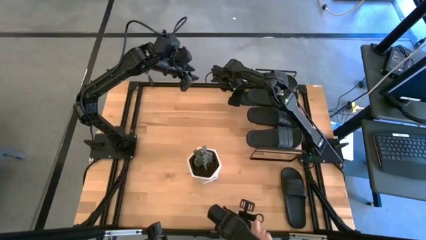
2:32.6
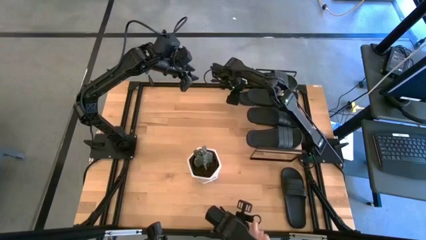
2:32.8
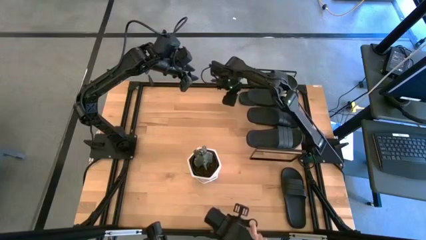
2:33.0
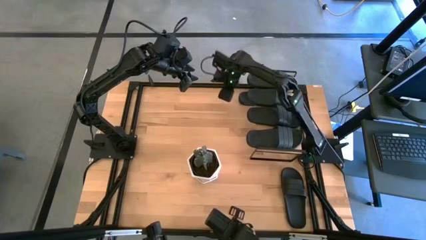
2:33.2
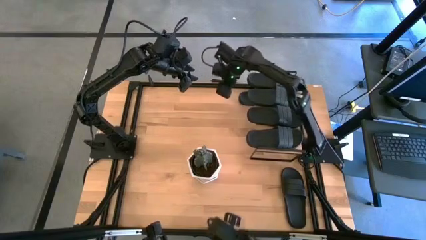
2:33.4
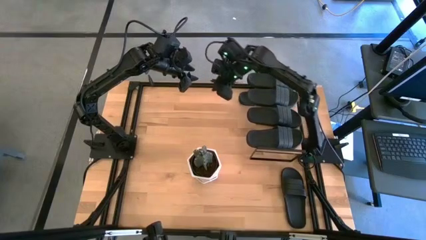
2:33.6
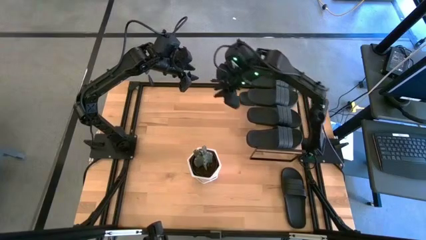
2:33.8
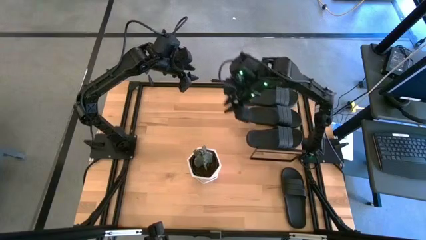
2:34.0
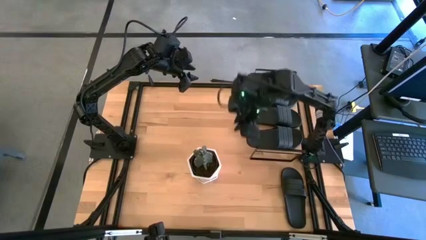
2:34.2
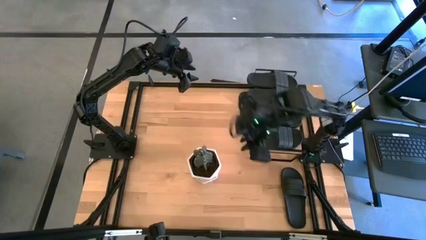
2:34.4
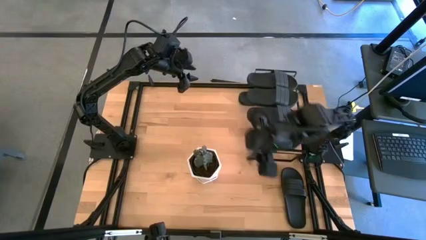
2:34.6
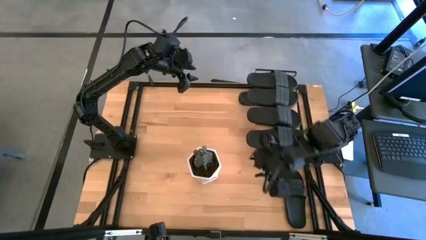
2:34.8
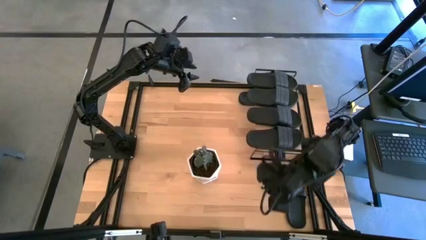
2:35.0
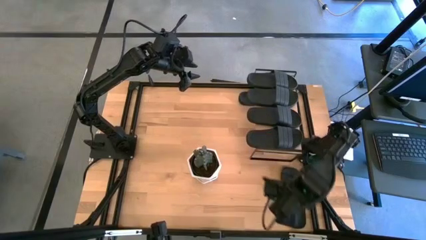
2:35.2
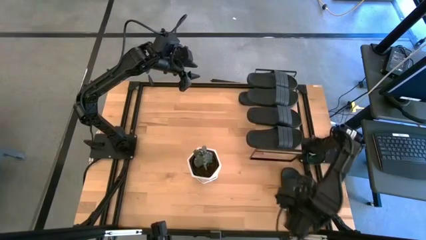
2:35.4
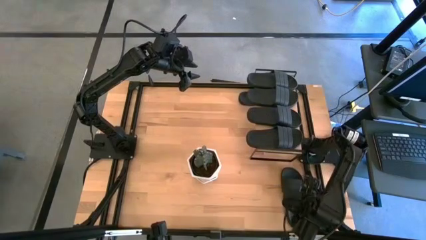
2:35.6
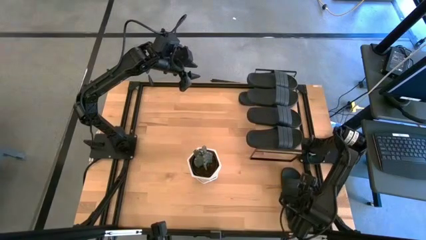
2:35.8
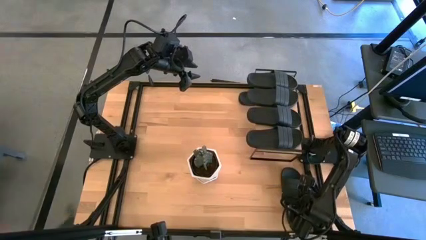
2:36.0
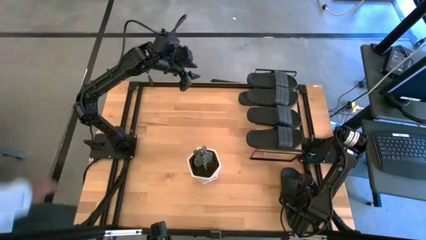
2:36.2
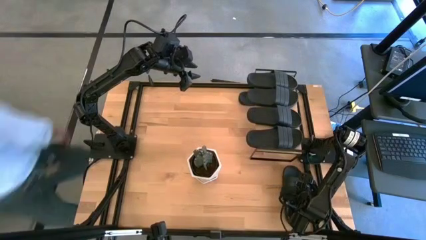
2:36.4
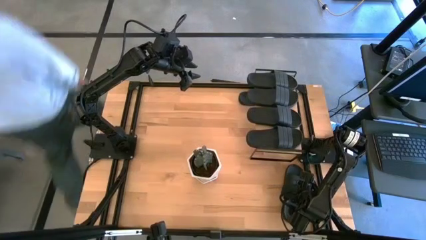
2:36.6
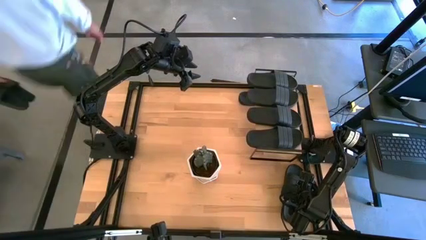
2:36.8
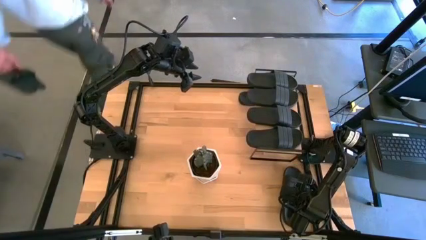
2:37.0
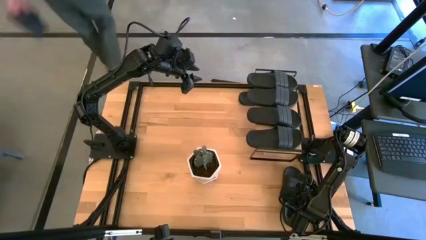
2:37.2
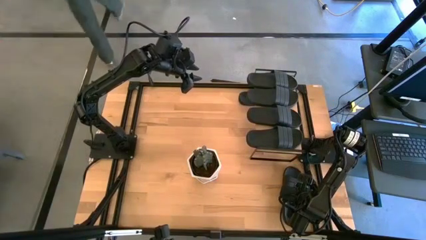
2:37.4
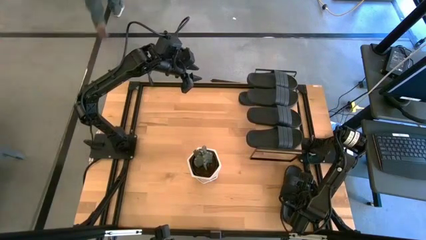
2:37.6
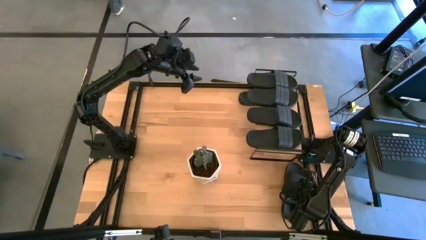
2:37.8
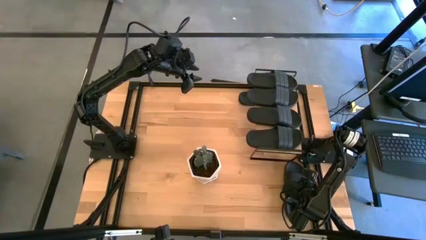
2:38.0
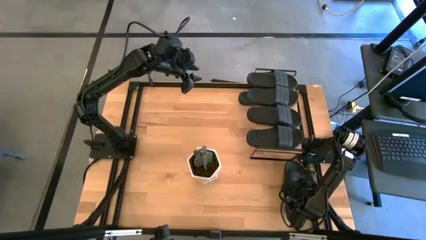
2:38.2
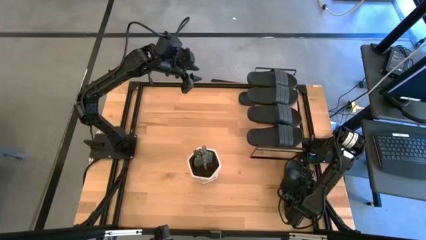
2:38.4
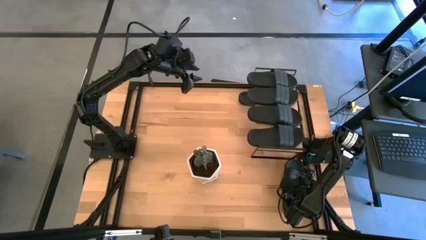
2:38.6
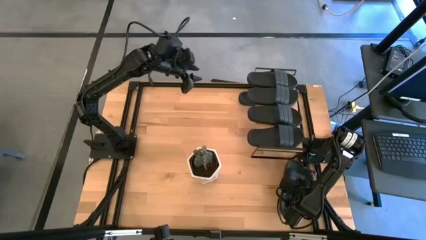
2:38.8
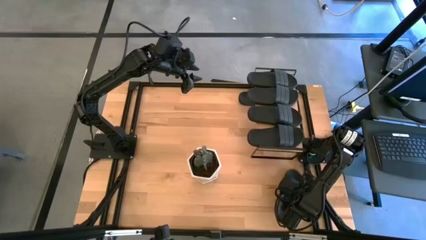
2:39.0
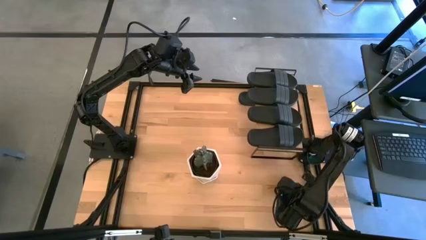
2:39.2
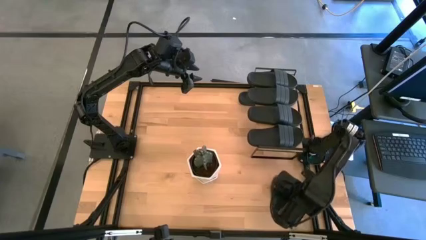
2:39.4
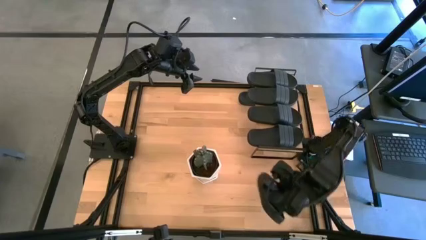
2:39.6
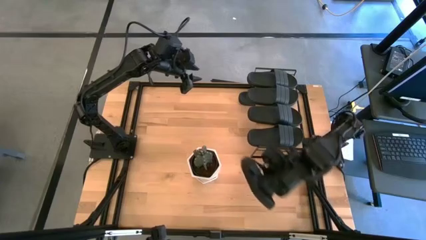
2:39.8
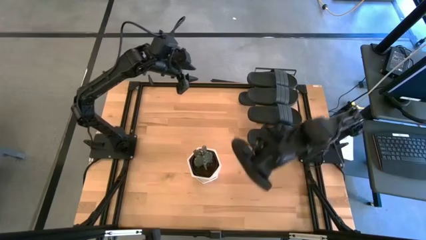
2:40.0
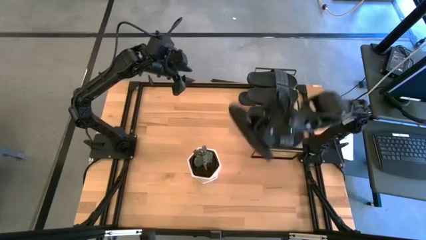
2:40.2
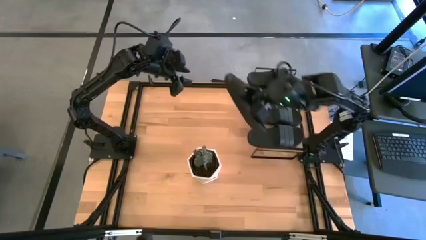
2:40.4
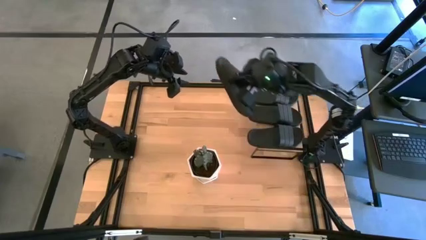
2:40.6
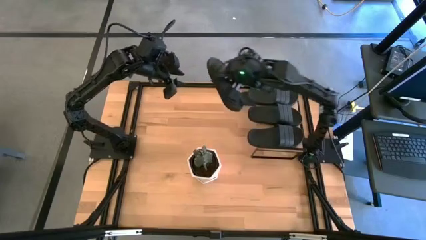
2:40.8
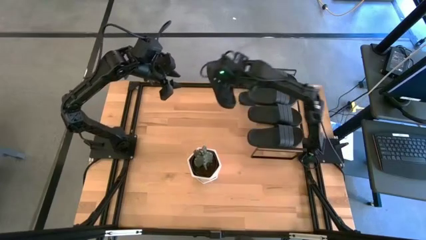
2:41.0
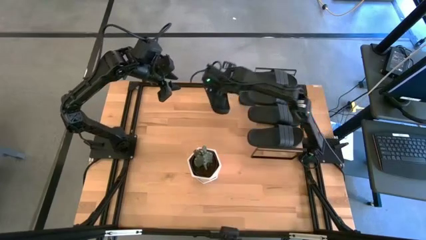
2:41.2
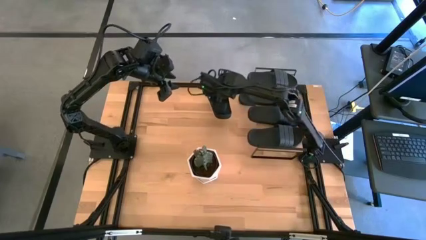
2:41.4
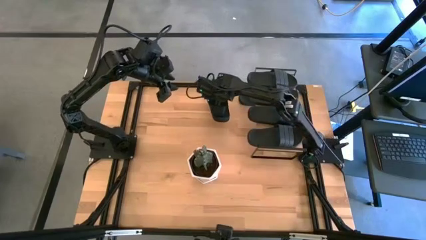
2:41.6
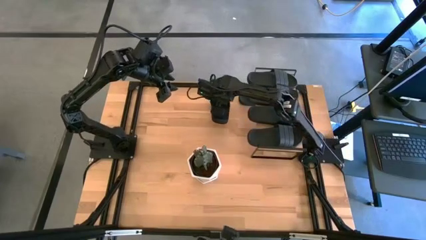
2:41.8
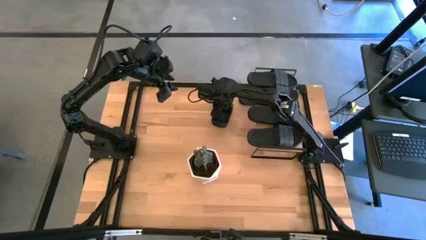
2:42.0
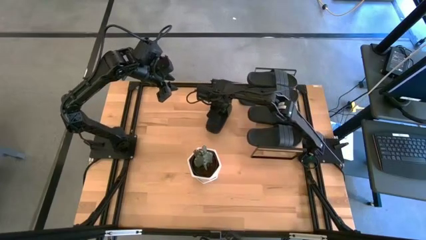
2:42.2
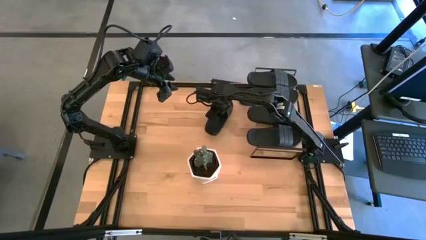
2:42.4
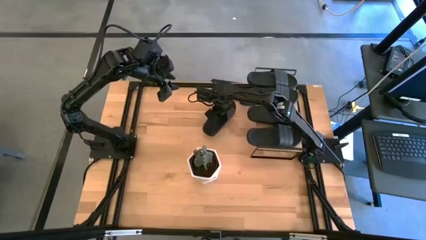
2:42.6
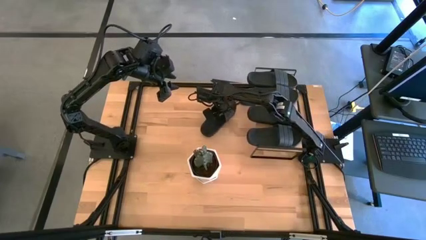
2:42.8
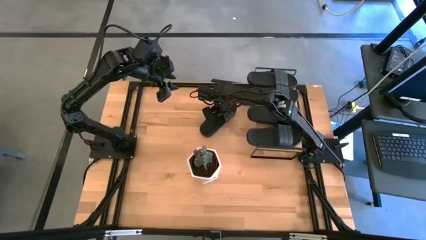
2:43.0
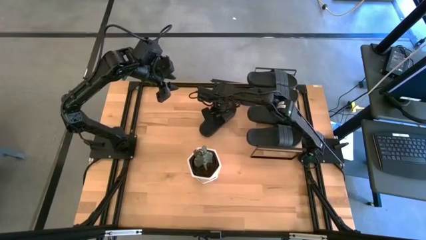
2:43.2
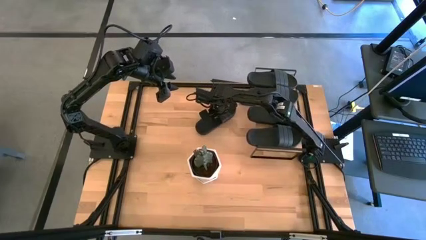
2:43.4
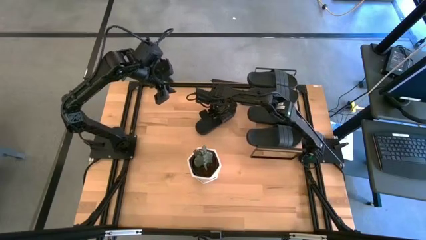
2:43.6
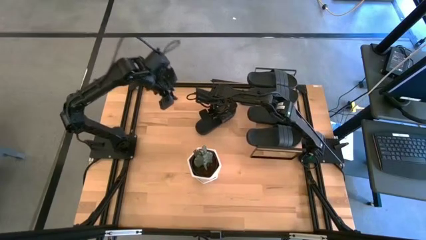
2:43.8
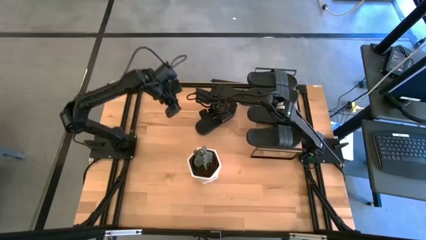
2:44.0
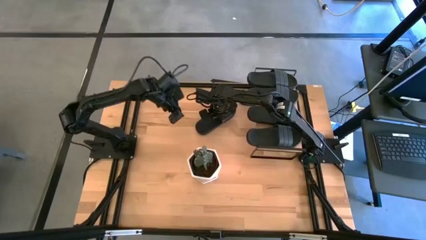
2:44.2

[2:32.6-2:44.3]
Task: Pick and place slides into the shelf
Put the black slide under the shelf
